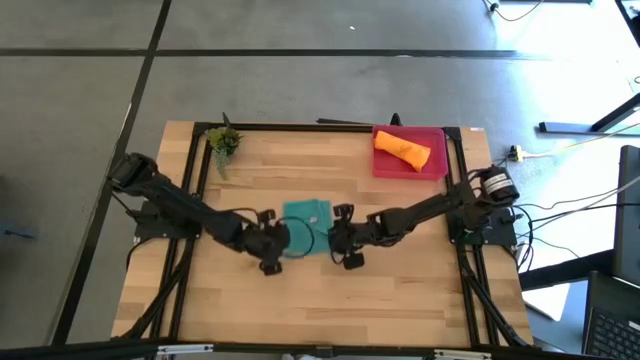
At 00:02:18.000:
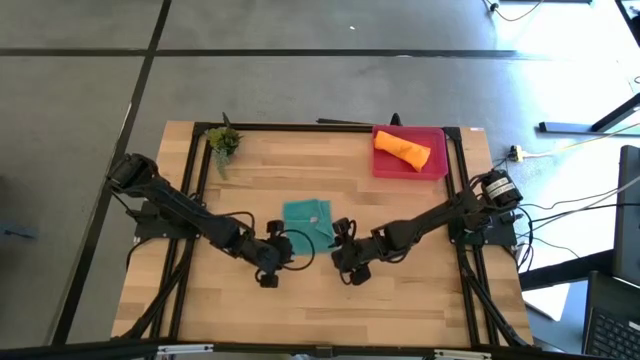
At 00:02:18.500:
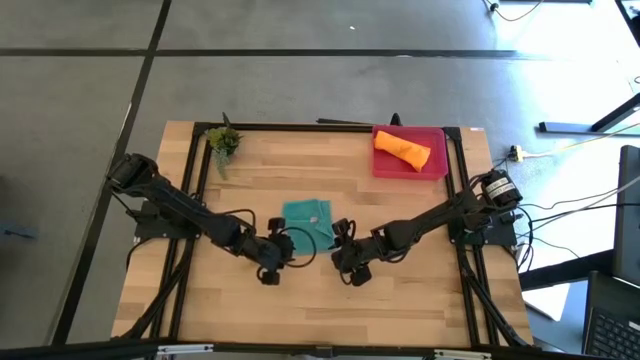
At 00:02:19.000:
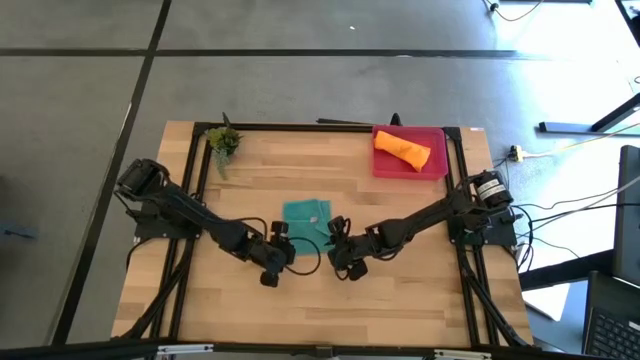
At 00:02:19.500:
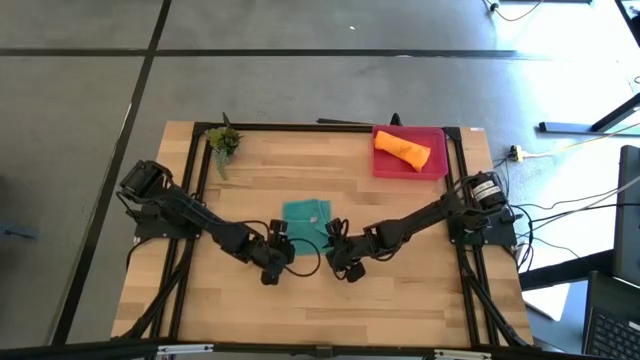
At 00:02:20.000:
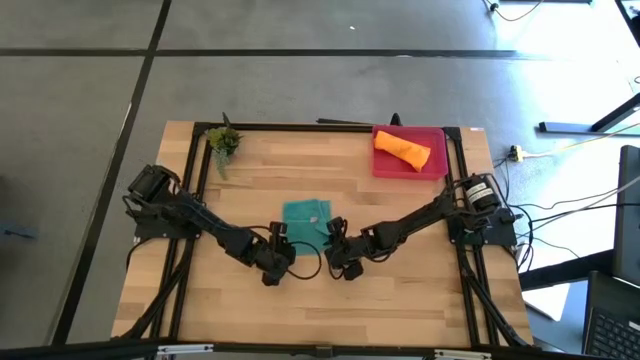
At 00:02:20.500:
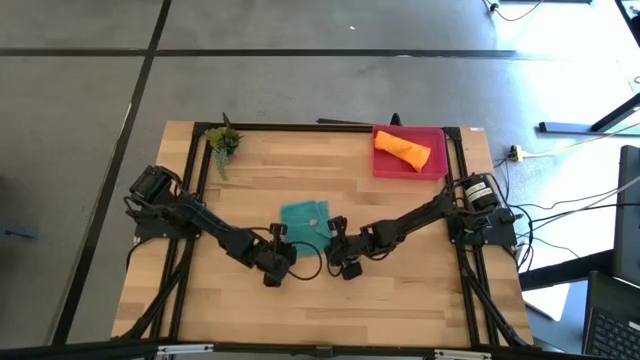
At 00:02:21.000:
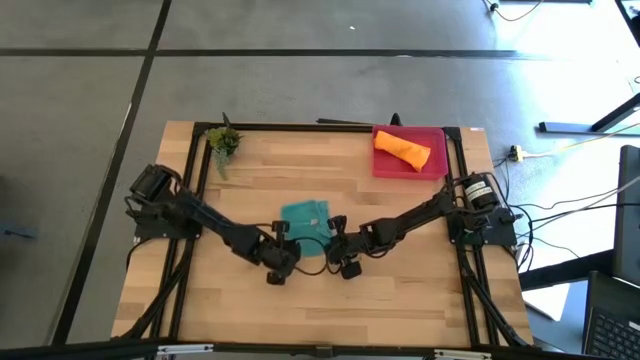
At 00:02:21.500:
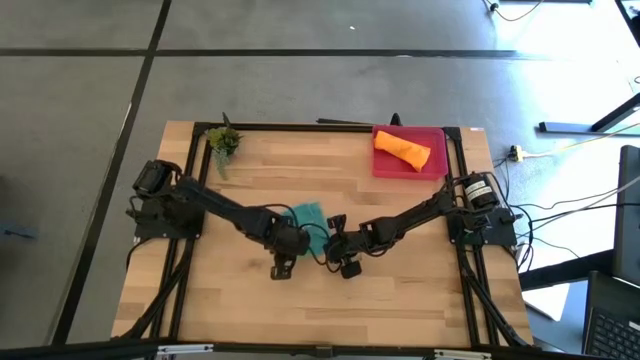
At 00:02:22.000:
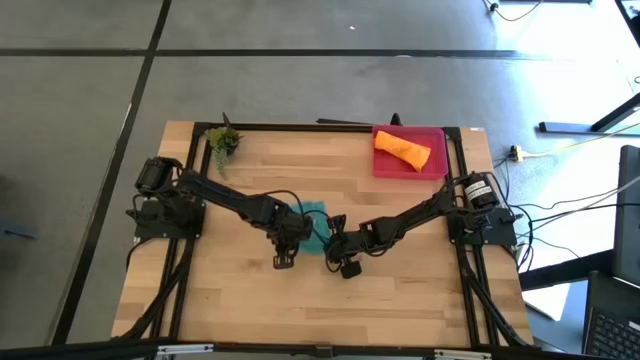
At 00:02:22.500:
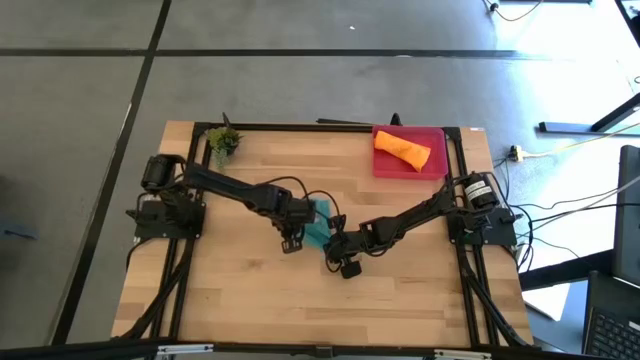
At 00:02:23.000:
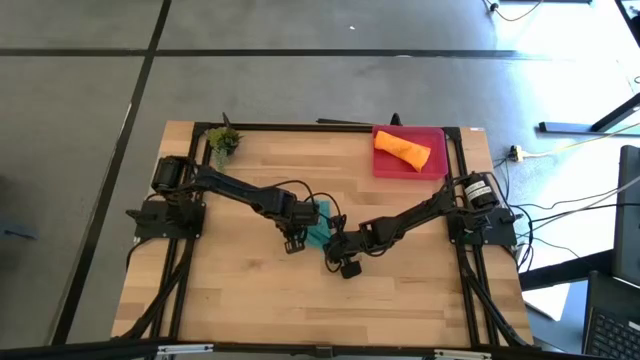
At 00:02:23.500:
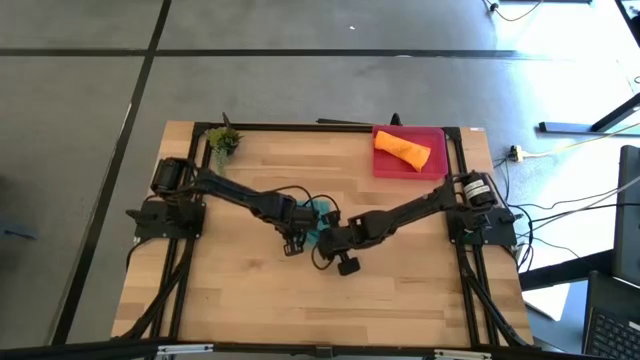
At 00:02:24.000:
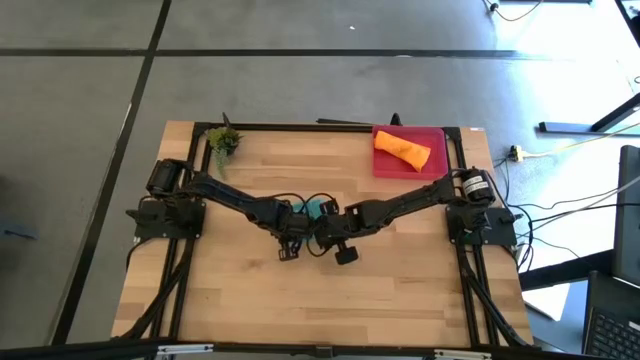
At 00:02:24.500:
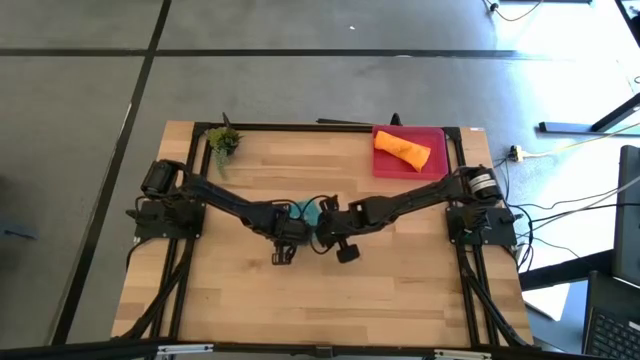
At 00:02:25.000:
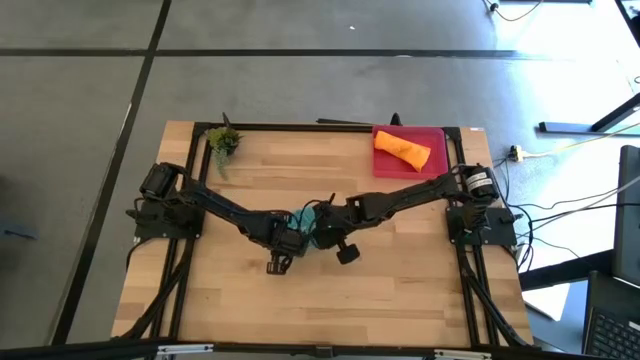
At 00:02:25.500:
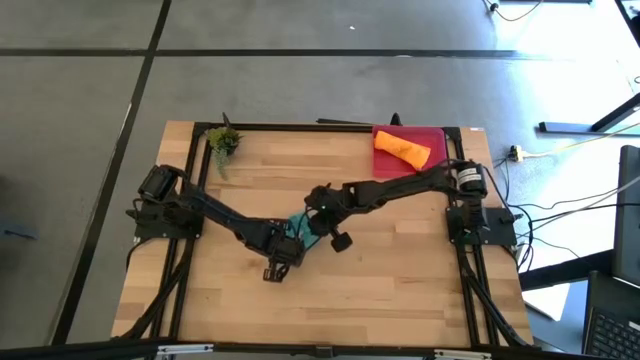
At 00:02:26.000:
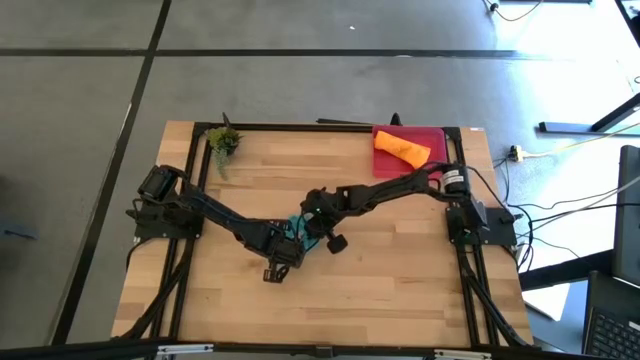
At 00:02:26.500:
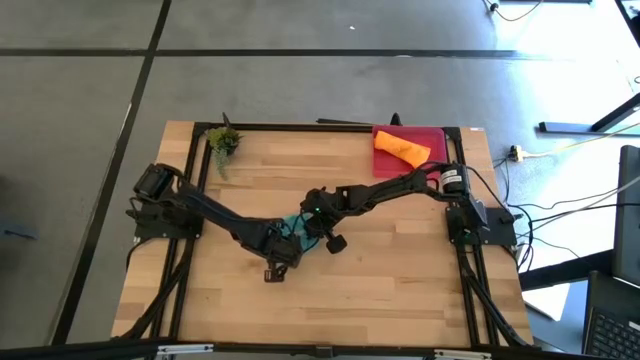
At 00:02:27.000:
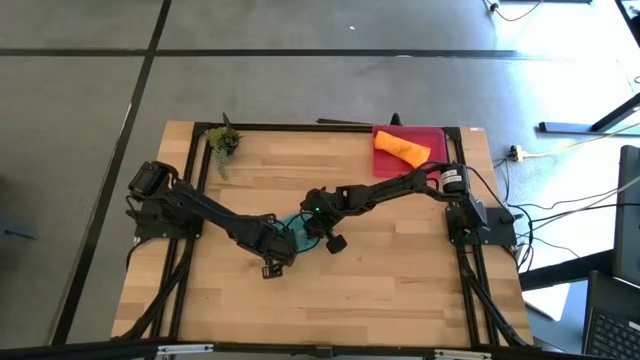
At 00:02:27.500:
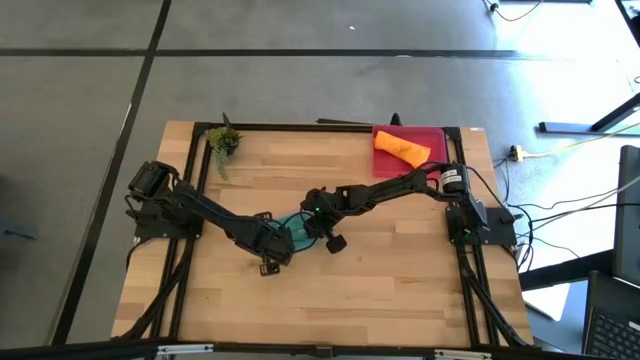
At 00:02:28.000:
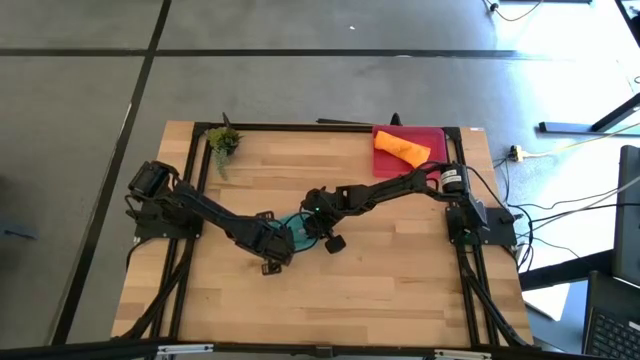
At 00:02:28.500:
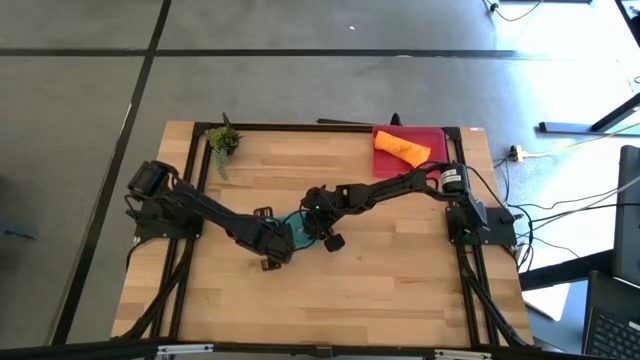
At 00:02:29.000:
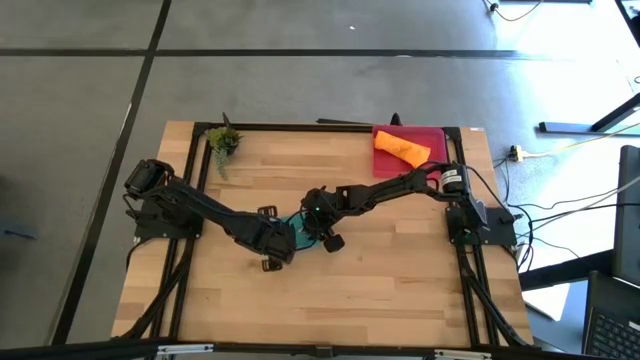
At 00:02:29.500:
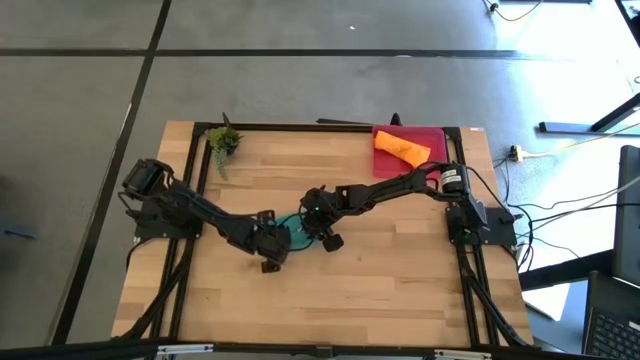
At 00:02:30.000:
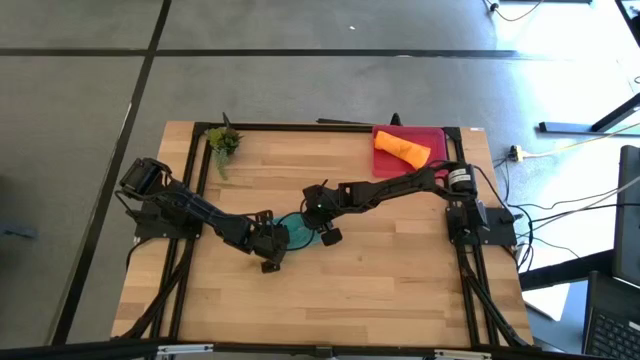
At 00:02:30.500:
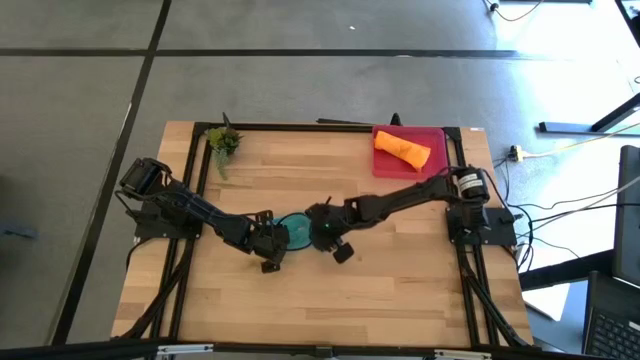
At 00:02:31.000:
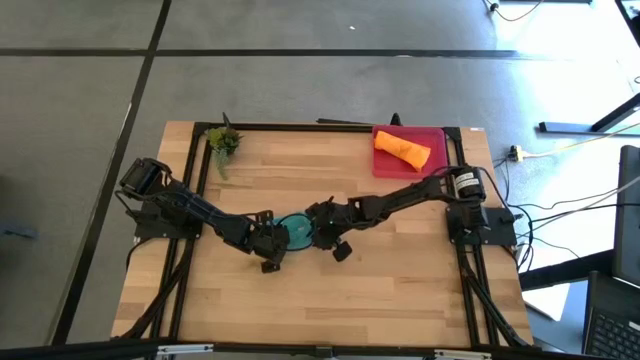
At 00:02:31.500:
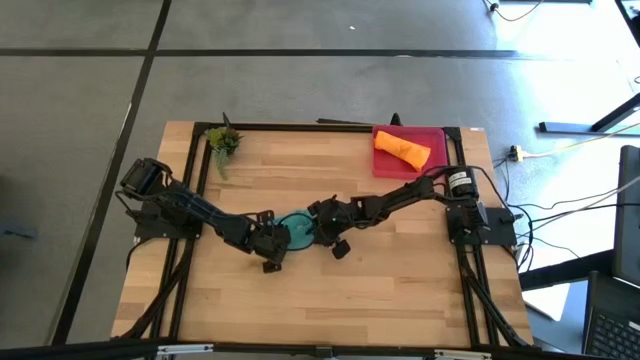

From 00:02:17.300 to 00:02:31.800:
Task: Roll microfiber towels into tight, uniform cylinder then place into a basket
Roll the folded blue microfiber towel
